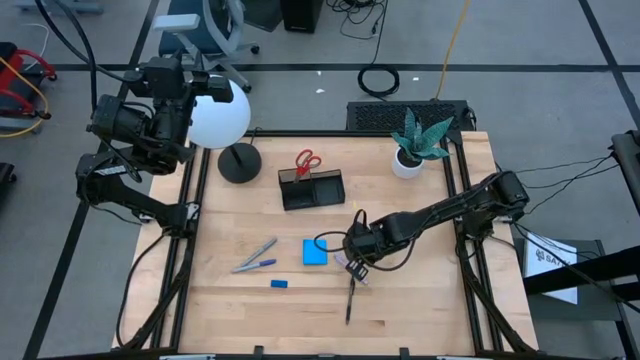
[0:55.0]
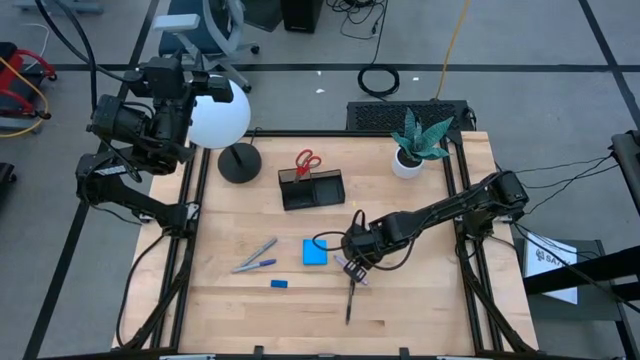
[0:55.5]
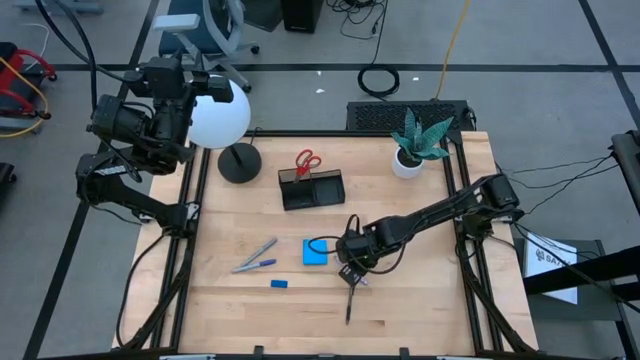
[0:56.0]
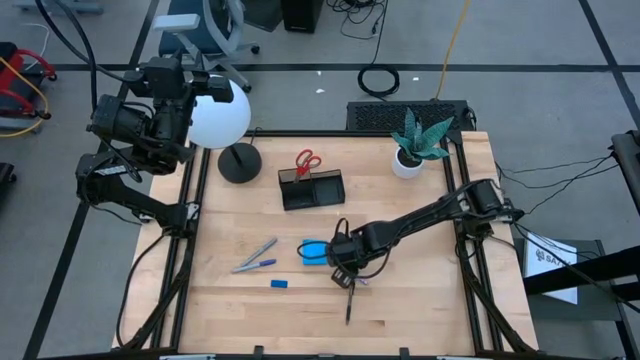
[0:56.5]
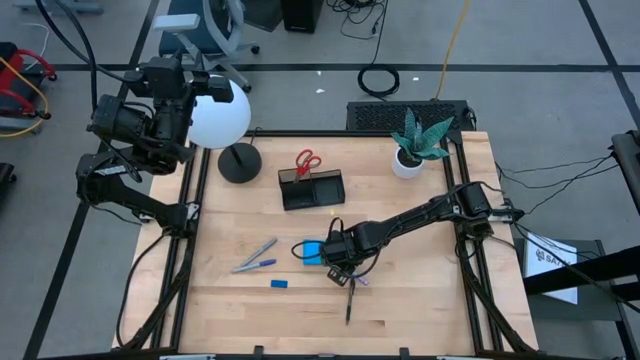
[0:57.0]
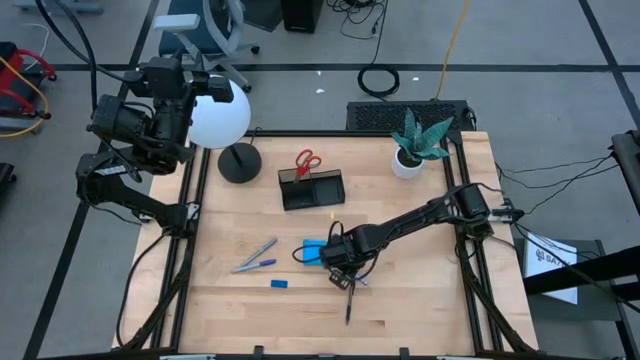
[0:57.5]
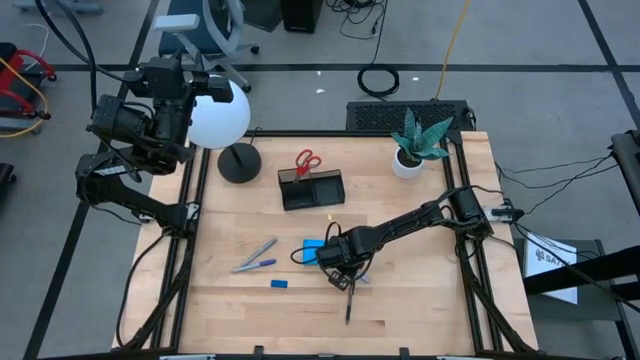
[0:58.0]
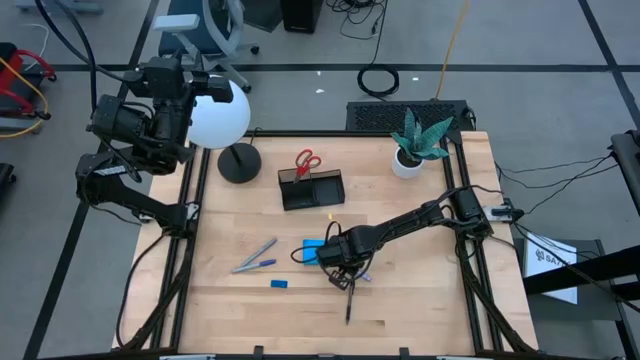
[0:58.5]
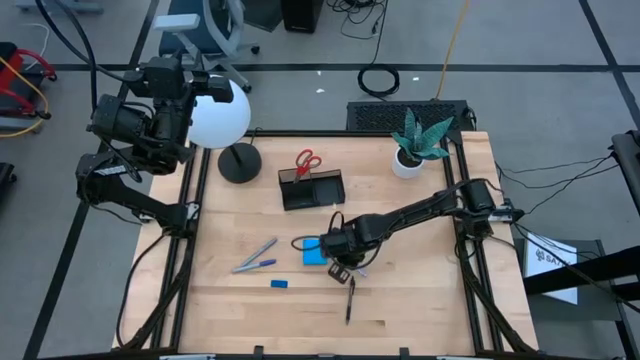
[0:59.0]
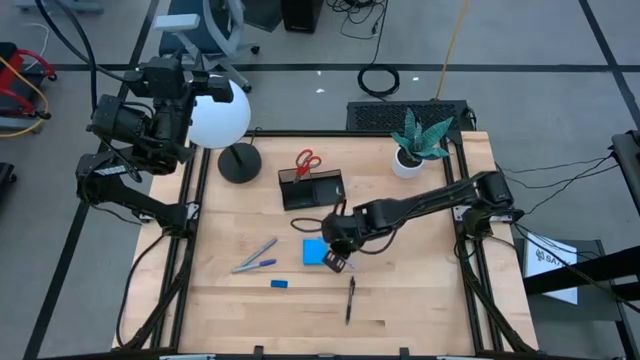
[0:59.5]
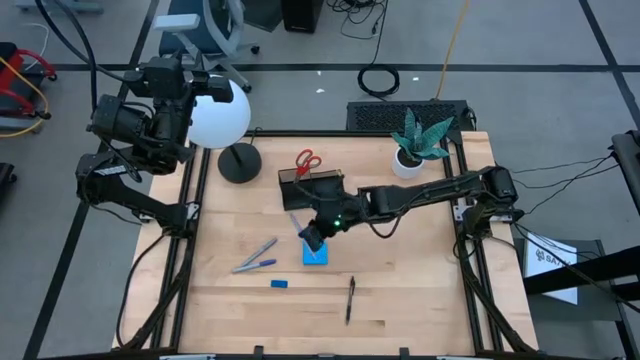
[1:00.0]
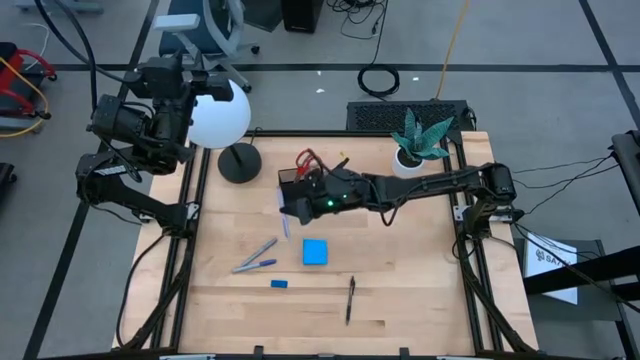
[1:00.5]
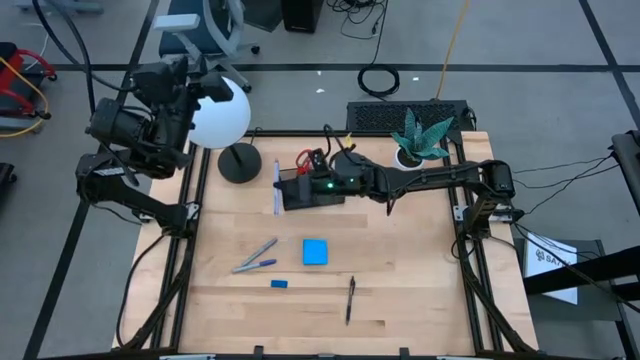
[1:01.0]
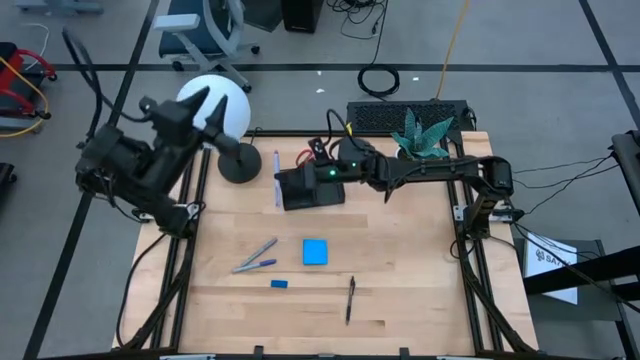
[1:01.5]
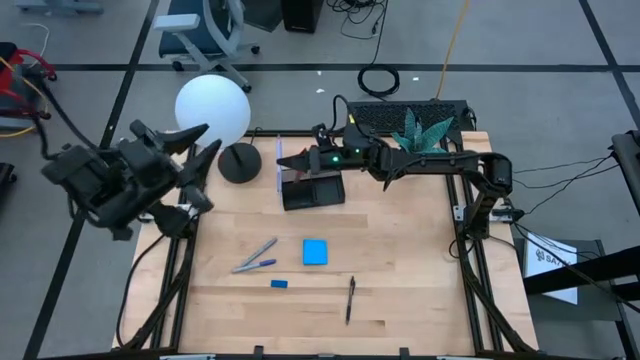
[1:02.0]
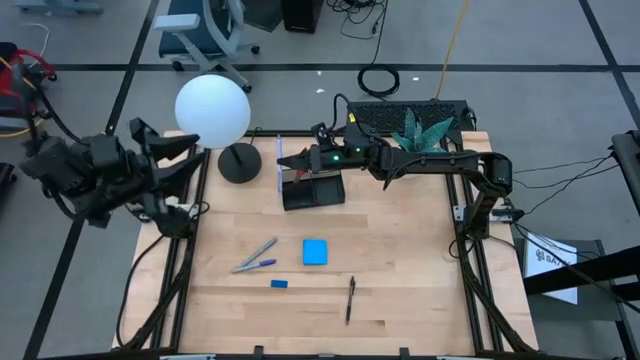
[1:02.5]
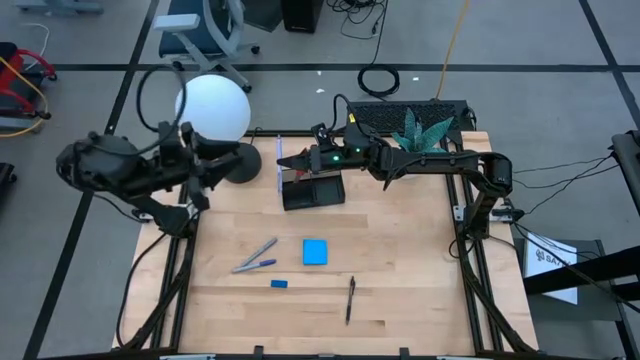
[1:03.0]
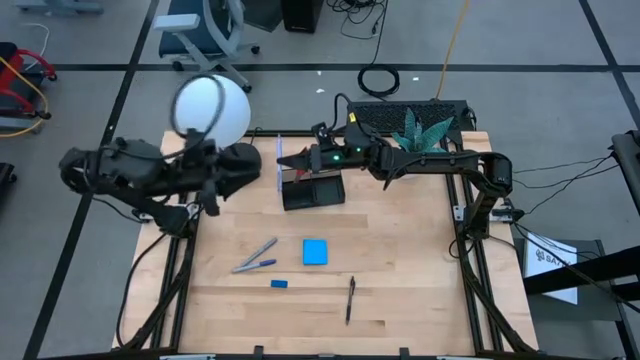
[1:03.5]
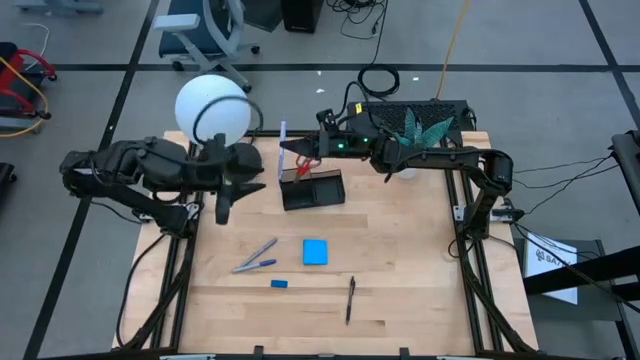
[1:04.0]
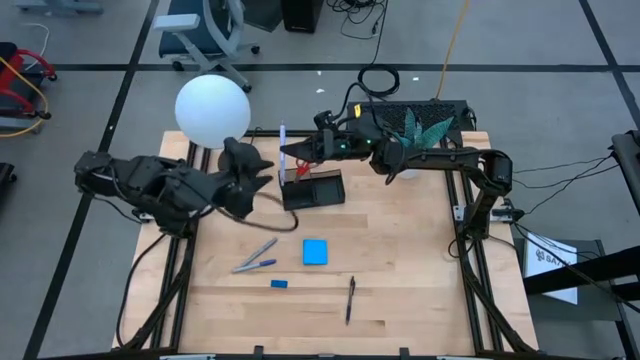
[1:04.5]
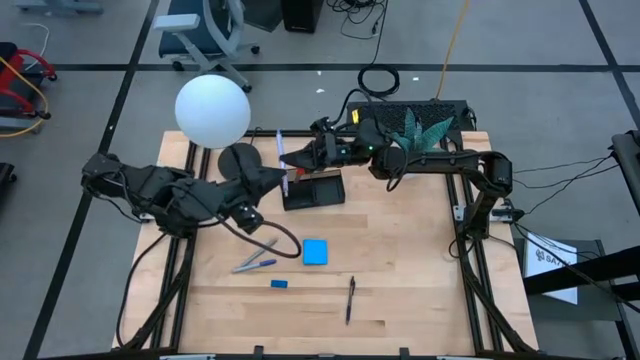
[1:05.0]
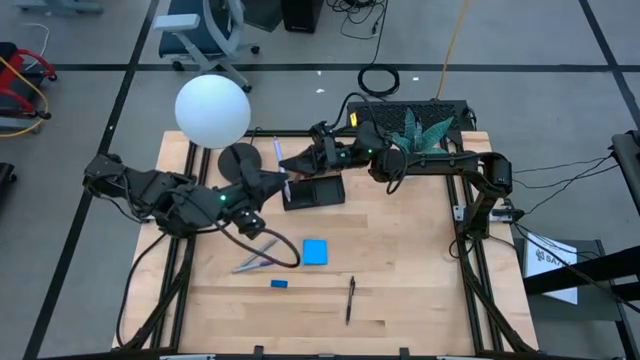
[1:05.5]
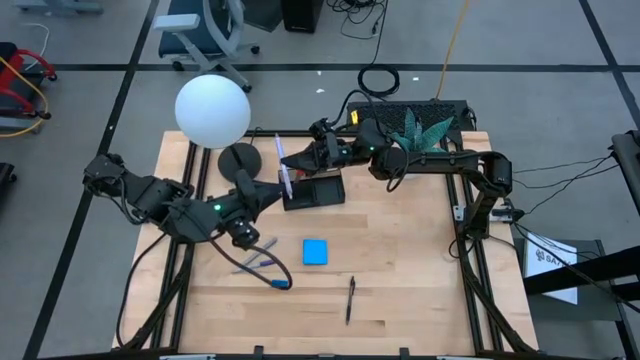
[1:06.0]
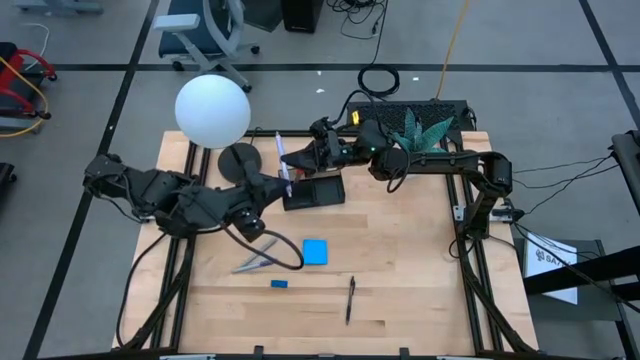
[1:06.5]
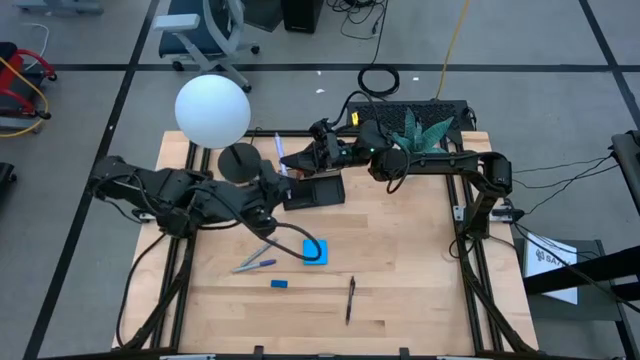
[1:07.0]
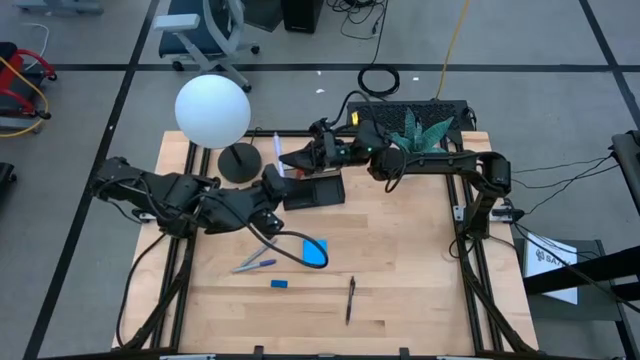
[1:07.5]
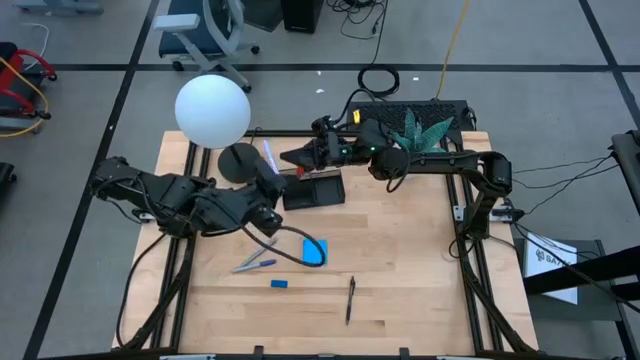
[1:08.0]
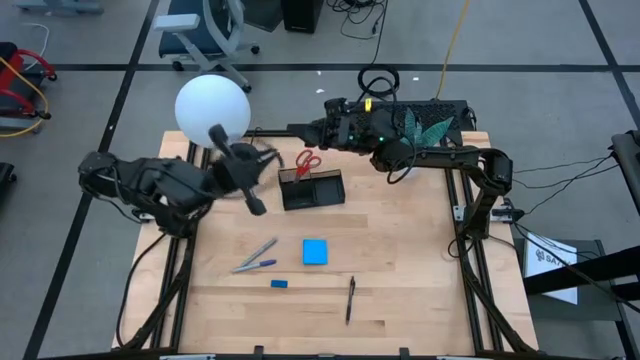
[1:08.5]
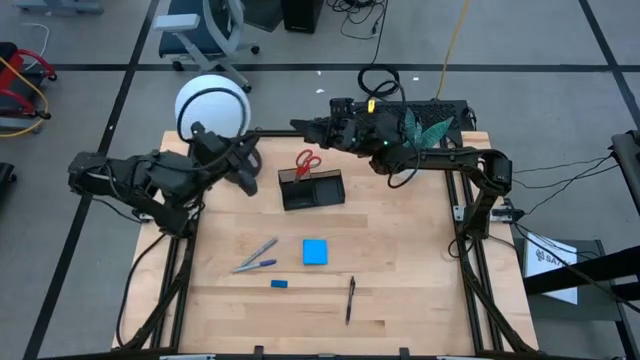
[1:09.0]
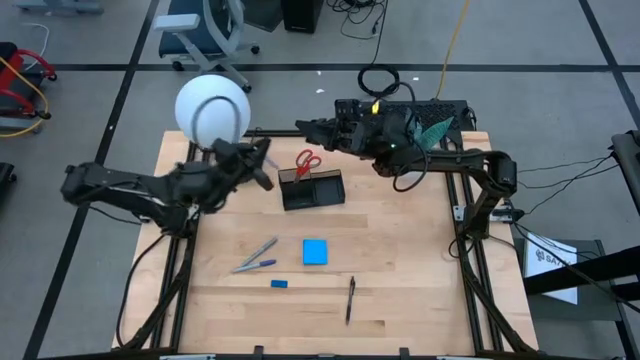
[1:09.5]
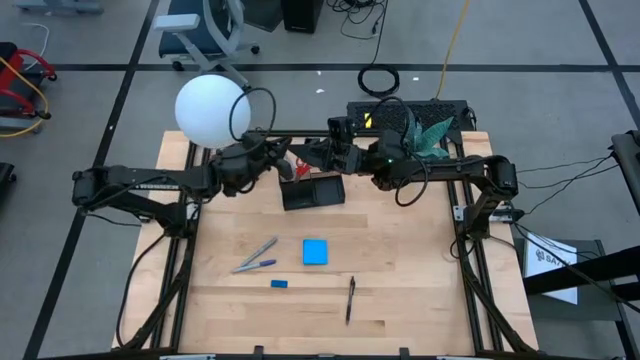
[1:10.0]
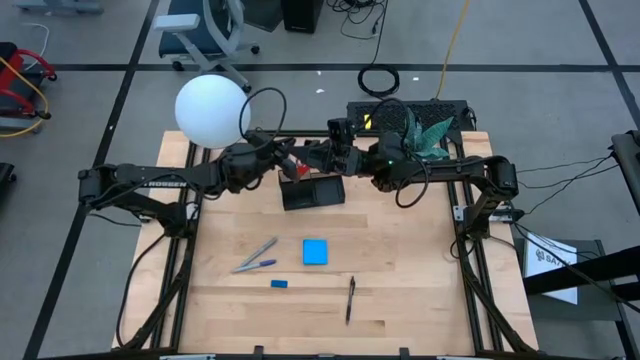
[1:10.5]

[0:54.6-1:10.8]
Task: Pick and place office supplies into organizer
Put the violet pen into the desk organizer

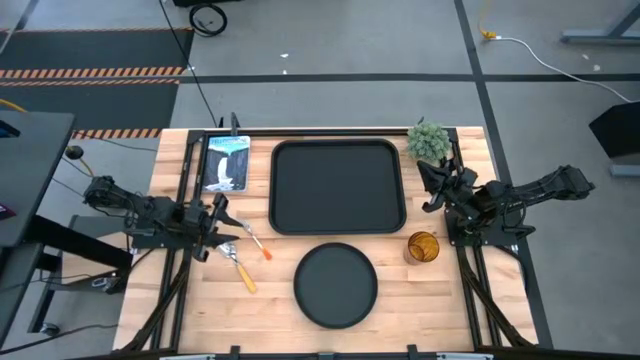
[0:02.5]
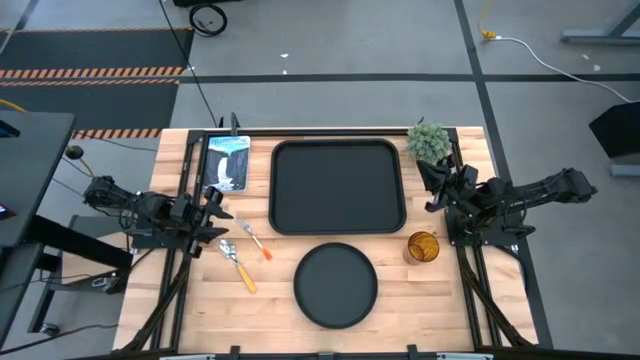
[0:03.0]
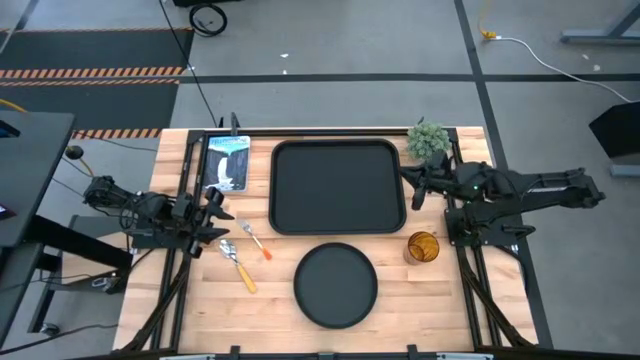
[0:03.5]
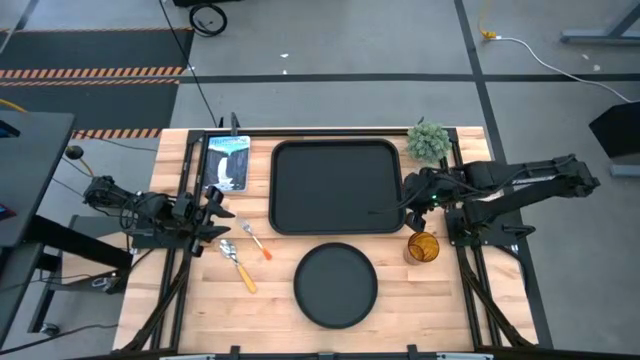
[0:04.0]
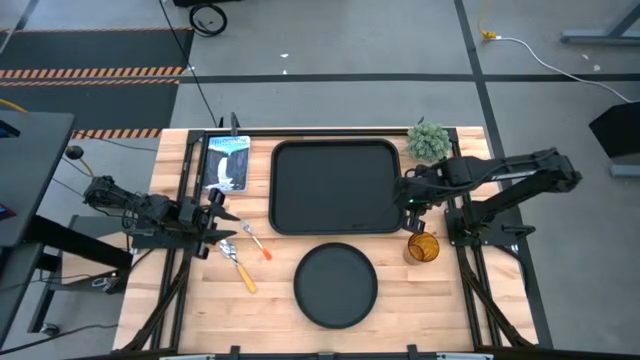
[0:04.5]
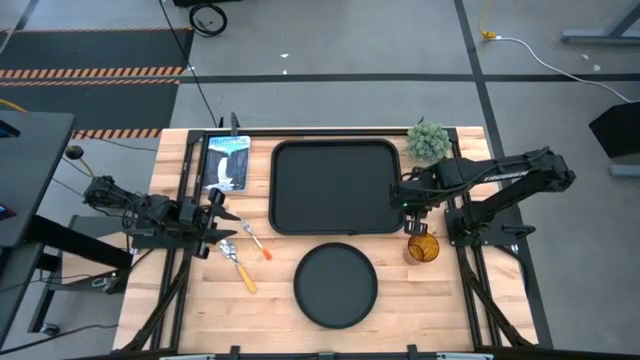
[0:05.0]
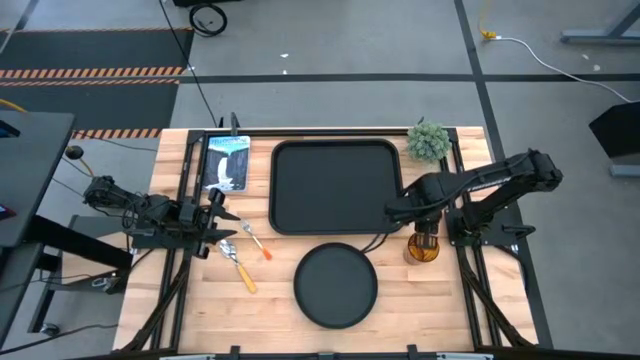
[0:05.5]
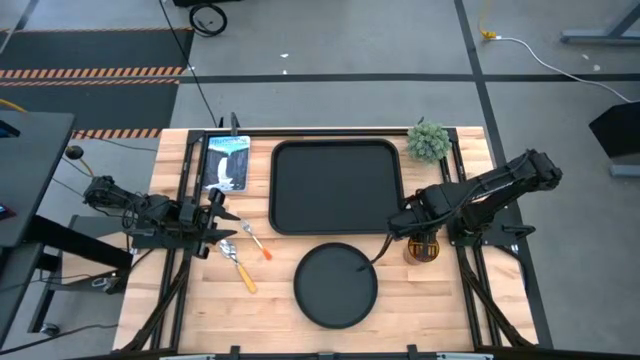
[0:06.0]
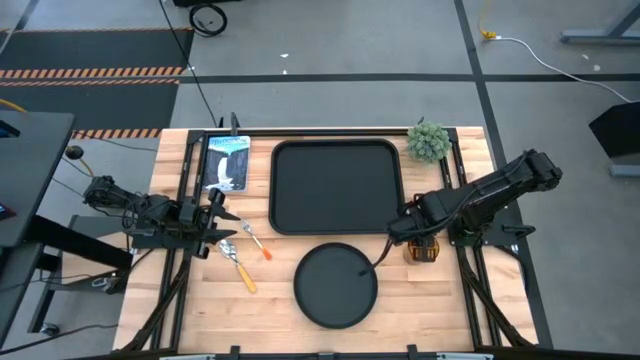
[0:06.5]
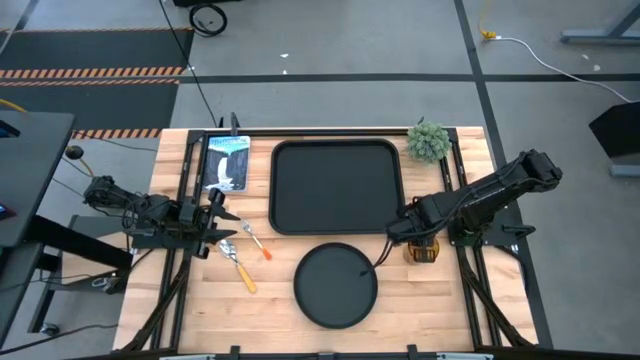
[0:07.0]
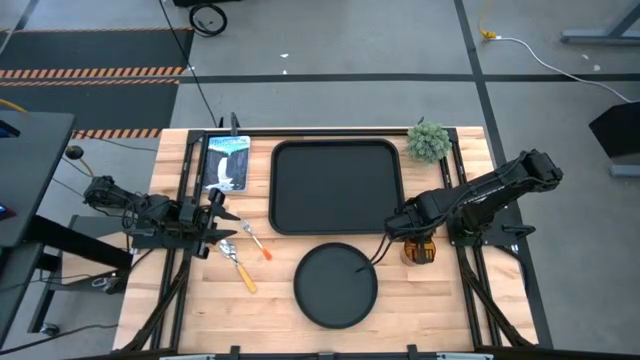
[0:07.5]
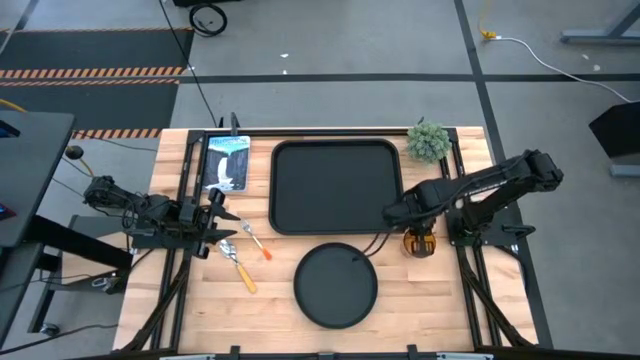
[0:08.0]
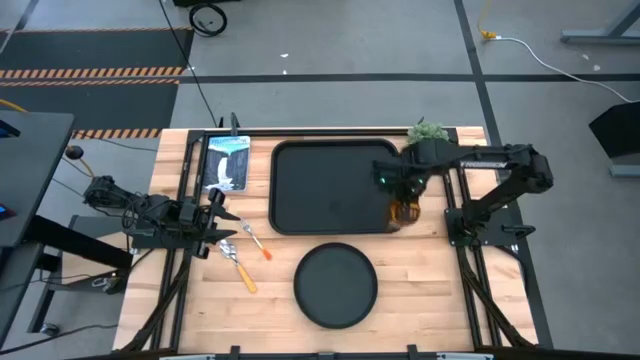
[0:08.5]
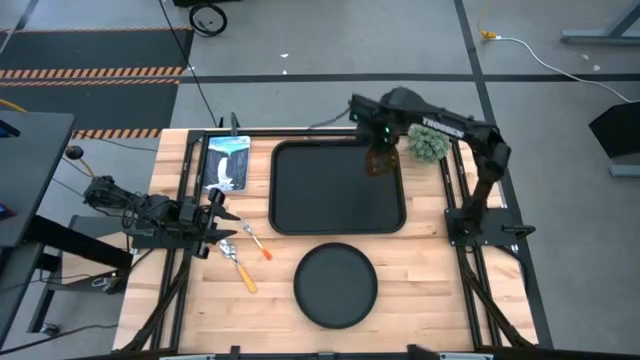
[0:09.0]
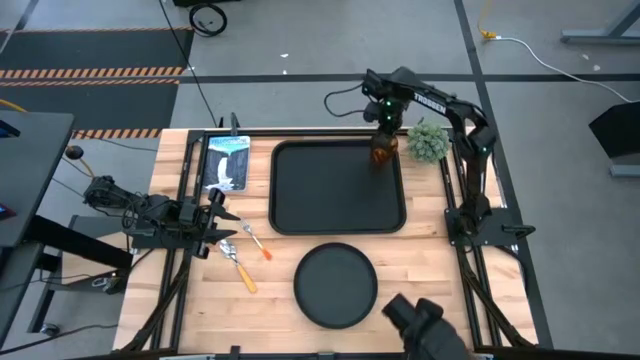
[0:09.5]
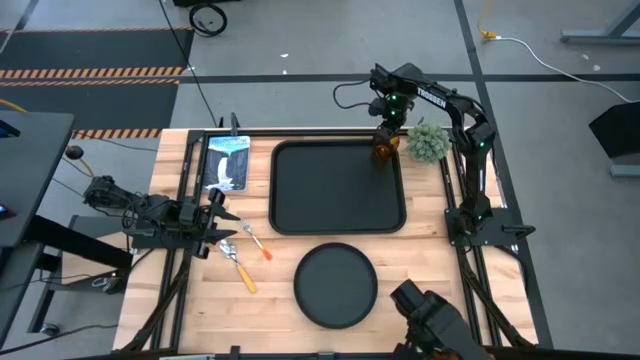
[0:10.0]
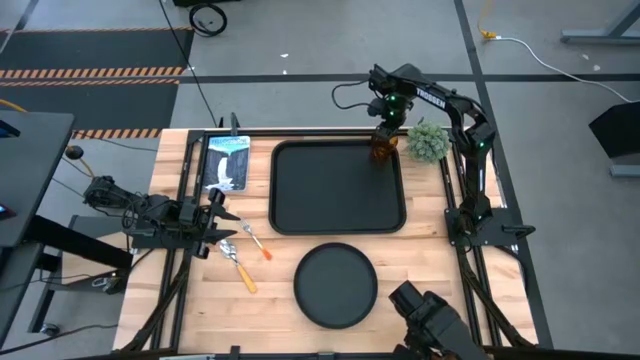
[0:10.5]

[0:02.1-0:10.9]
Task: Pick and place plate/cup/fork/spoon on tray
Put the brown cup on the black tray
